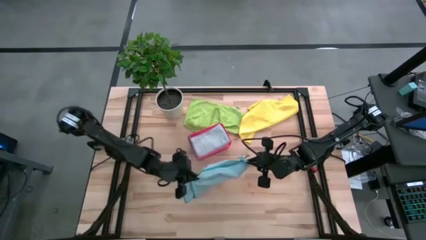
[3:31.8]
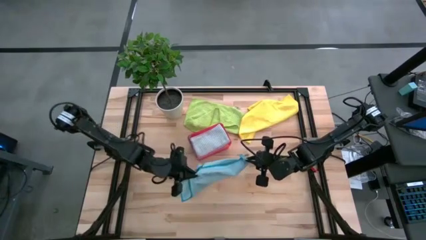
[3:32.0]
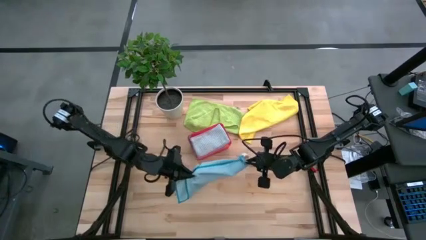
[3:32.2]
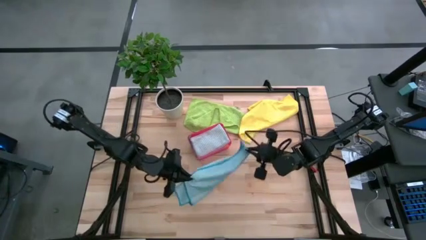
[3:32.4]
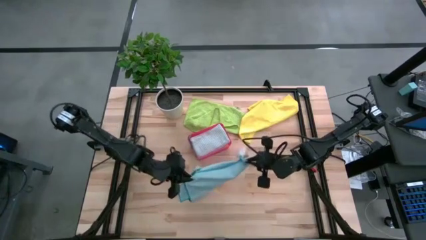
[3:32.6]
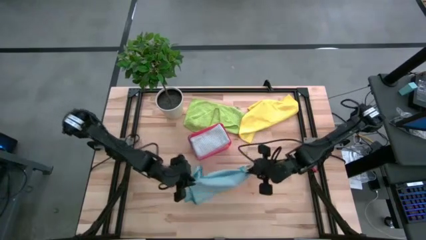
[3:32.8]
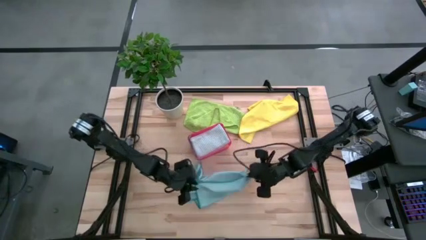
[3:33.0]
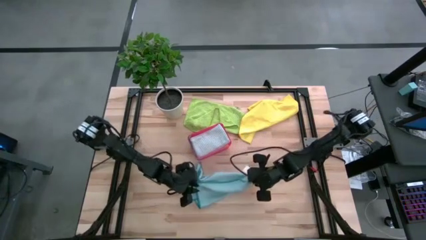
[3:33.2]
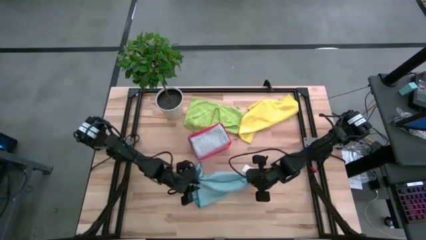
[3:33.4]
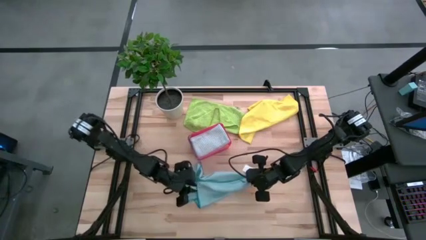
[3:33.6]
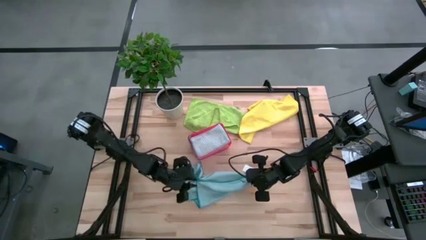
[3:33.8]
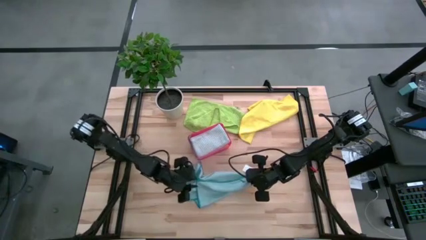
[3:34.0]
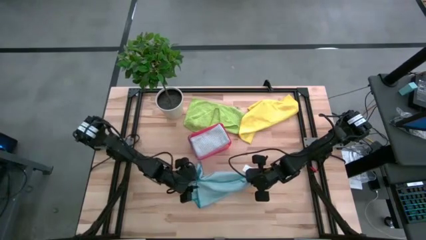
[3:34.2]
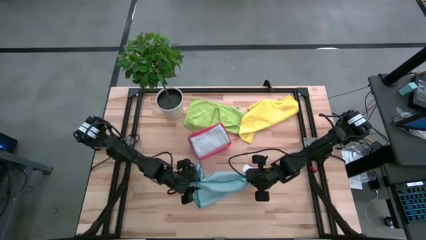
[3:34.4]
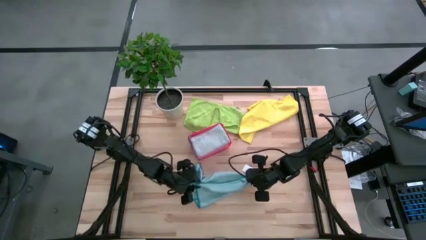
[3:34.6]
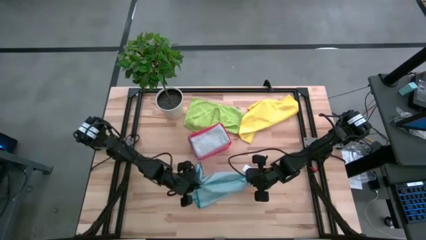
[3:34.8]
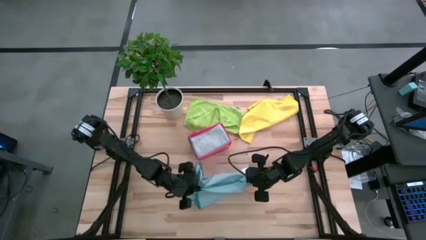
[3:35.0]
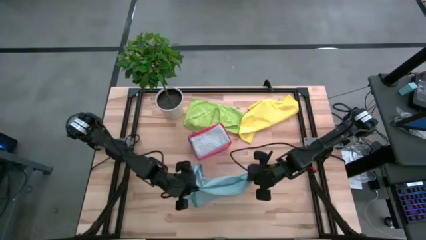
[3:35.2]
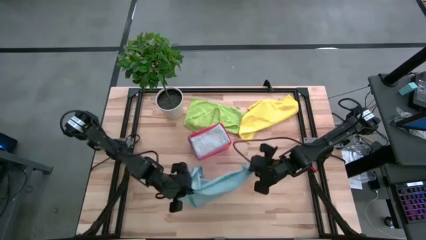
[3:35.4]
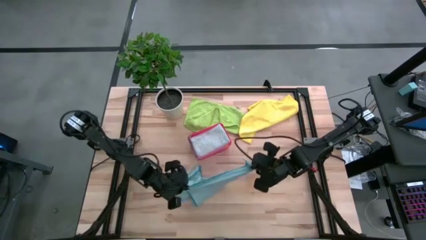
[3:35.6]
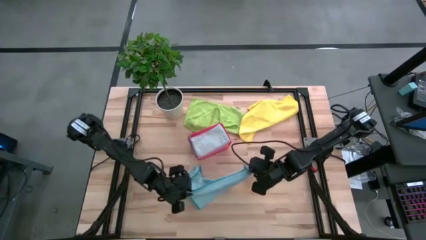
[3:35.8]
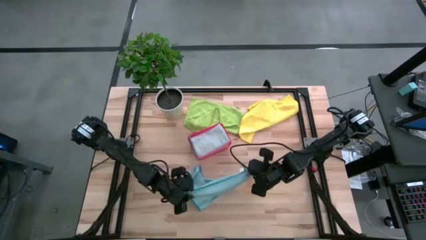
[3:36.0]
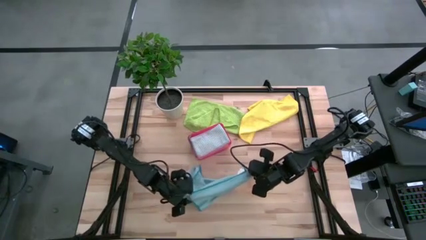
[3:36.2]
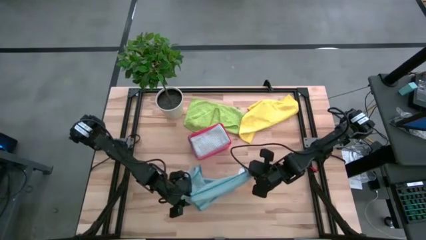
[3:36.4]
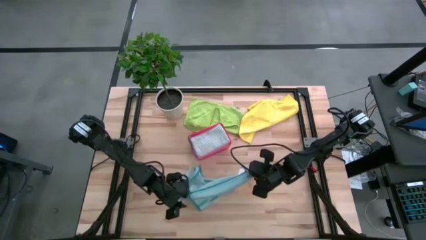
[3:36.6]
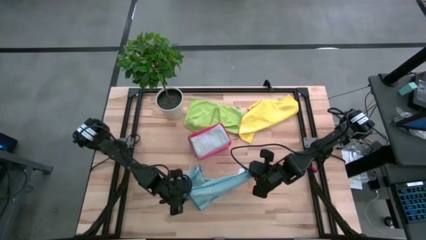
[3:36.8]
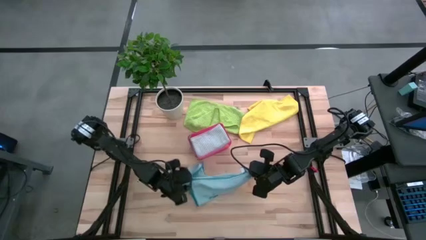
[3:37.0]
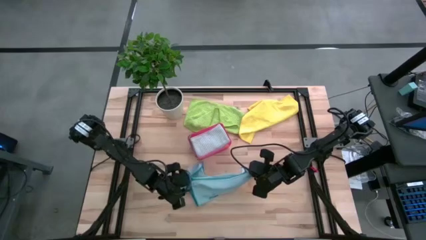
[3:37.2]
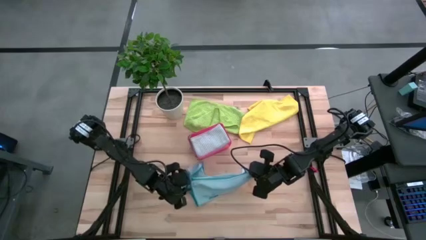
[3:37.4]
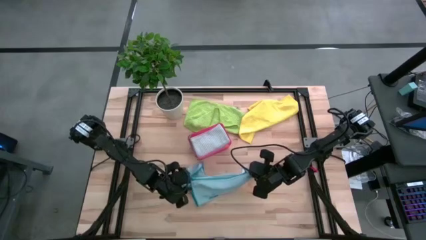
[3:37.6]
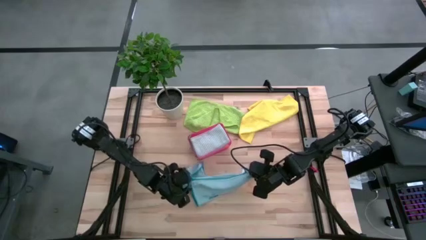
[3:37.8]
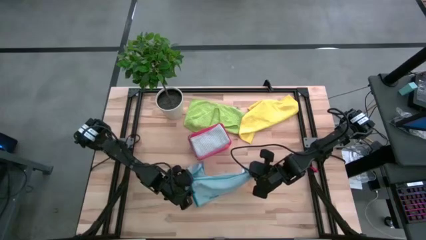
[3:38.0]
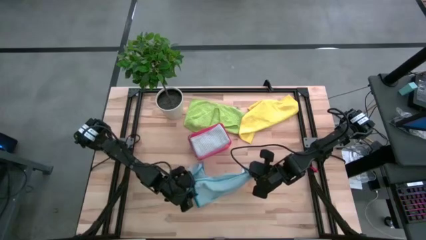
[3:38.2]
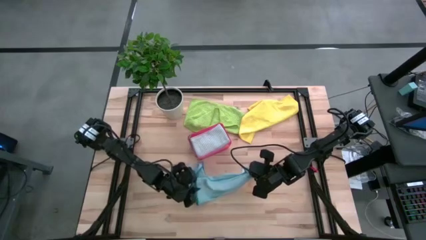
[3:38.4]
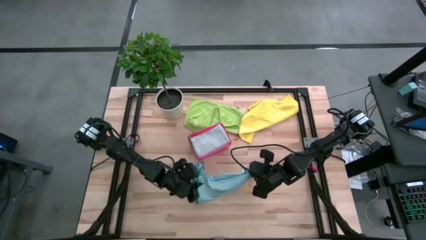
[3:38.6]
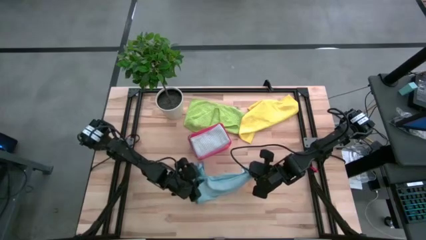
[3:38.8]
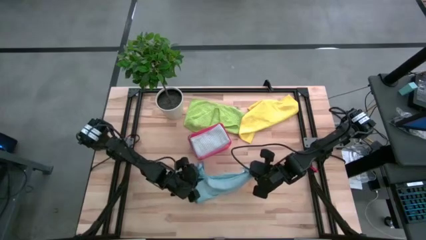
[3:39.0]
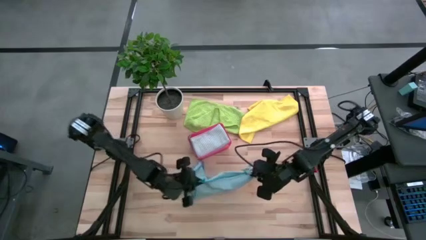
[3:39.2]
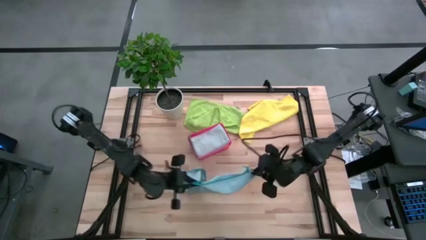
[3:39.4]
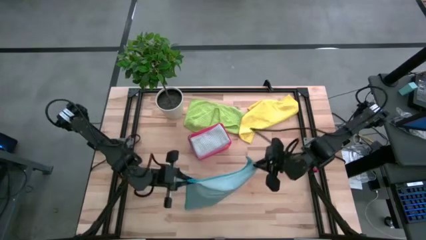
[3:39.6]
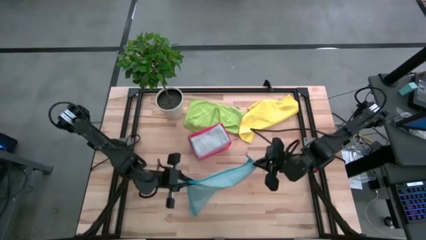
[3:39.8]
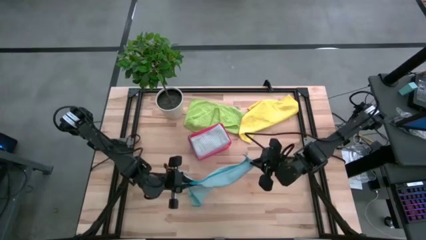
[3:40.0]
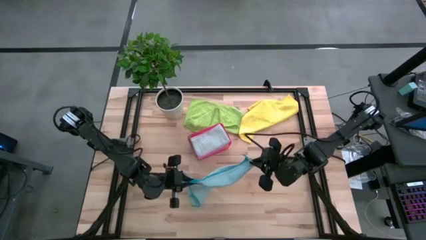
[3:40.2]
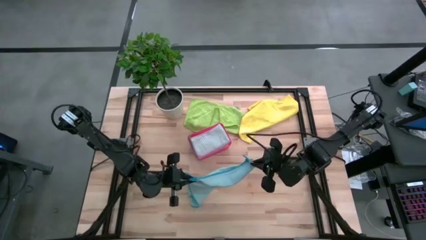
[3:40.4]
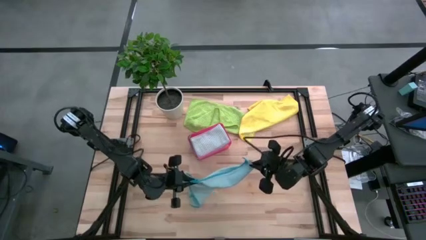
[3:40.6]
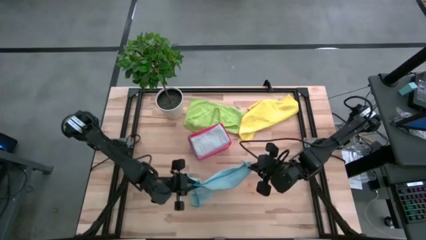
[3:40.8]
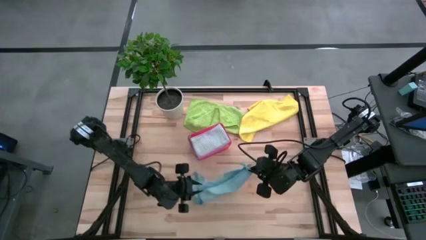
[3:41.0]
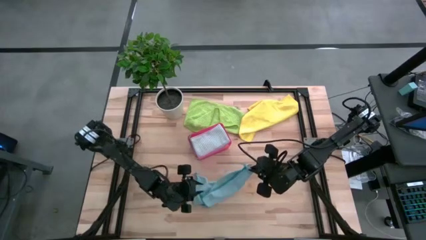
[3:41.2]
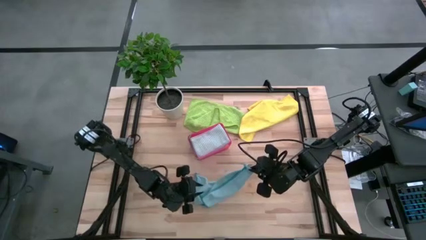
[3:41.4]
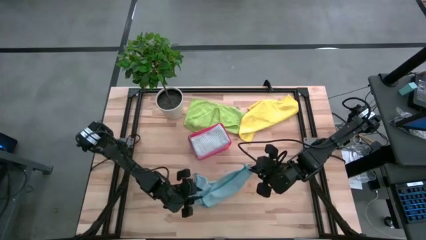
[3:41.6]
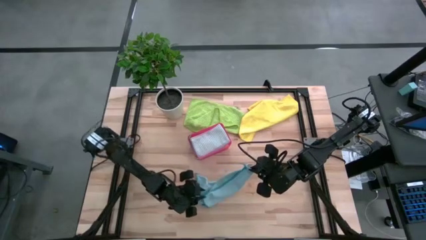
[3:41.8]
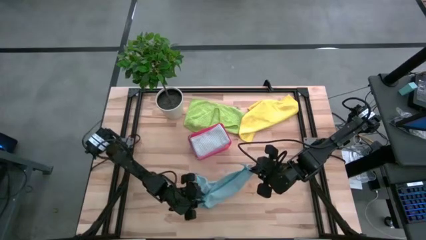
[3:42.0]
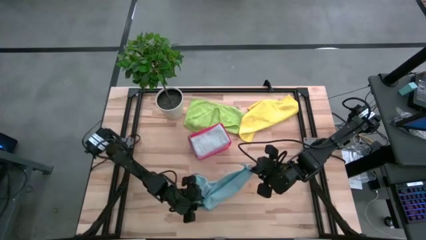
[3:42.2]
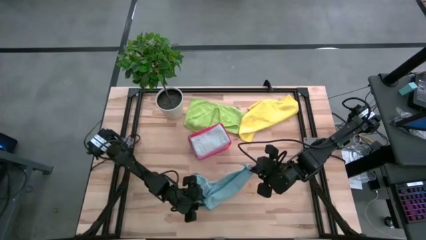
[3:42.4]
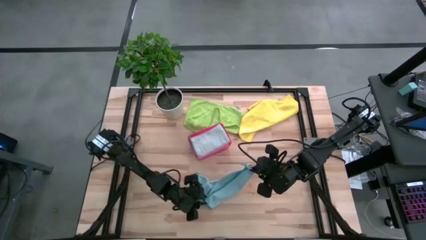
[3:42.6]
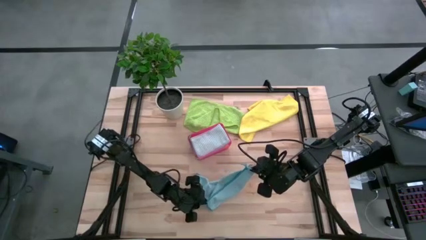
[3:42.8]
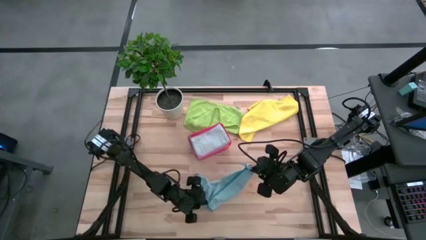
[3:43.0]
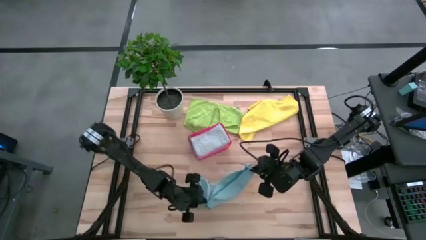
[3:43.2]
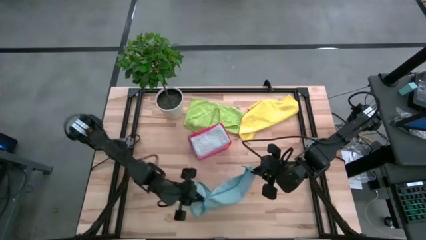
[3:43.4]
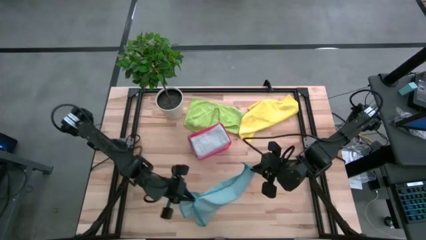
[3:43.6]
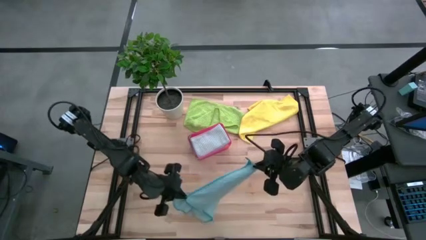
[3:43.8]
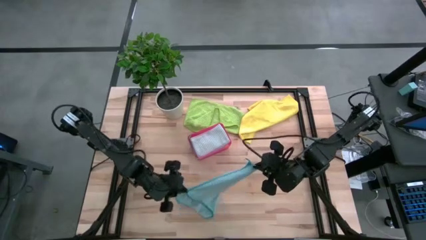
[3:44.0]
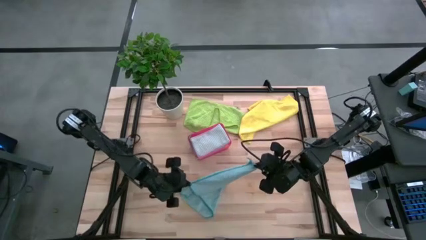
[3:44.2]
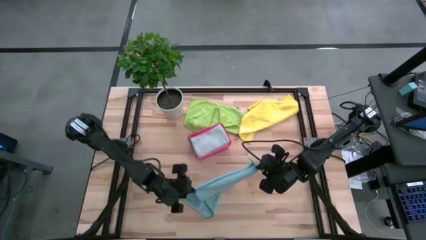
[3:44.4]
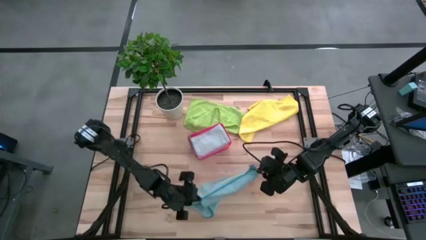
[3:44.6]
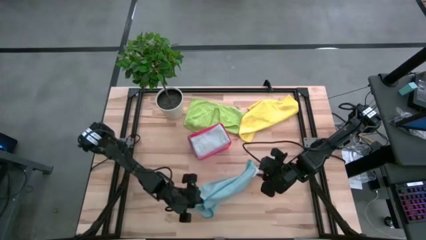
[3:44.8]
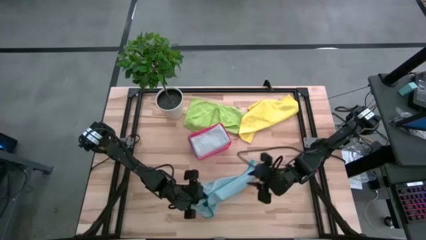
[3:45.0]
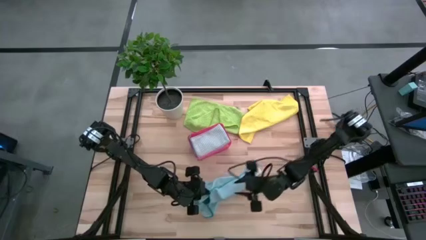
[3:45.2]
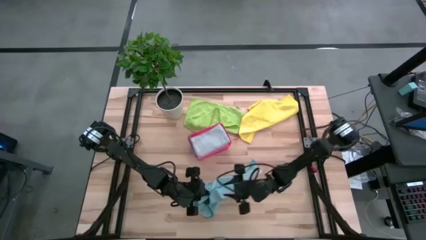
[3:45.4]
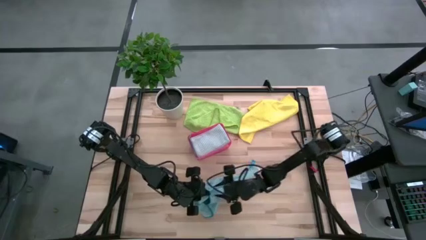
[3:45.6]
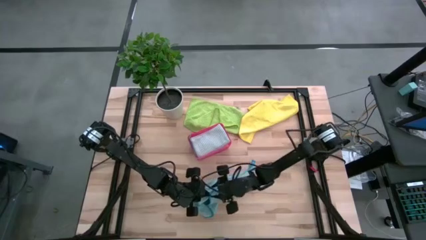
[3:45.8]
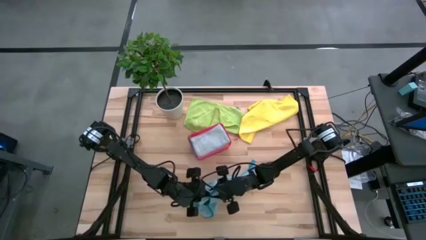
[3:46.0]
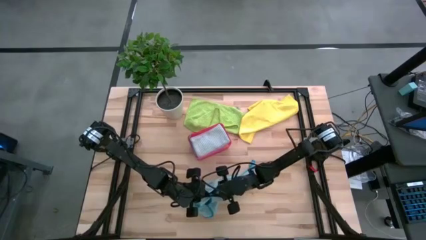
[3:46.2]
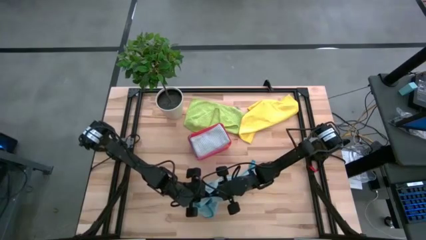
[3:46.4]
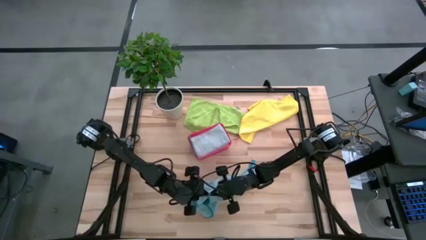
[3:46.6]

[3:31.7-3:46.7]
Task: Fold microfiber towels
Fold the blue microfiber cloth

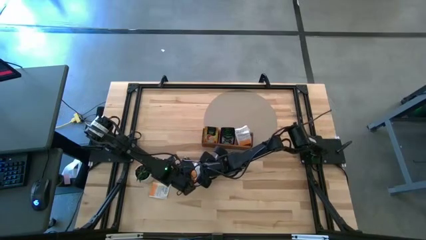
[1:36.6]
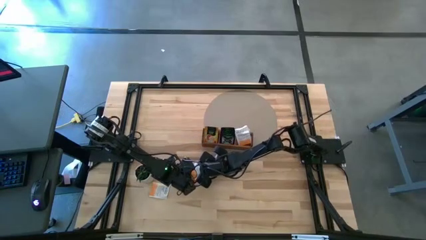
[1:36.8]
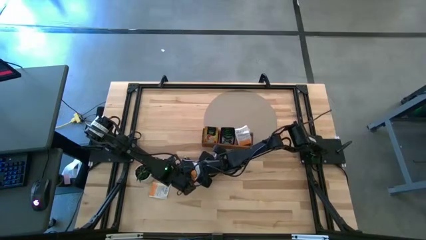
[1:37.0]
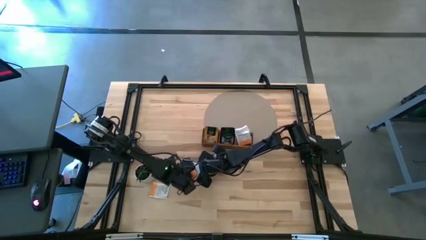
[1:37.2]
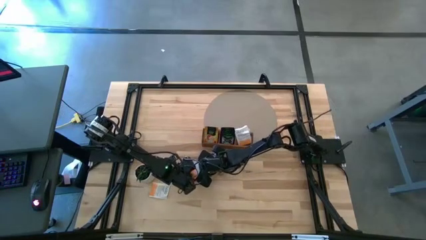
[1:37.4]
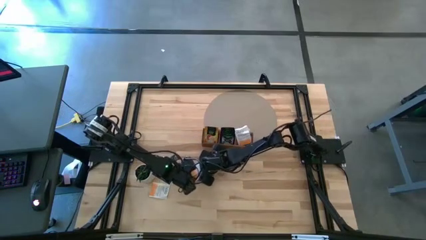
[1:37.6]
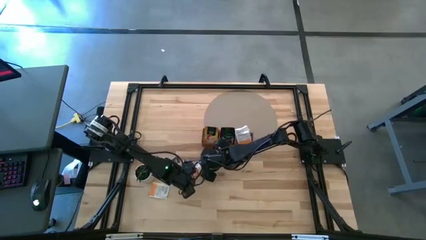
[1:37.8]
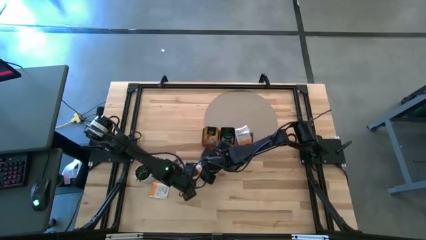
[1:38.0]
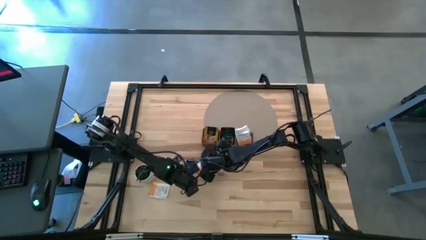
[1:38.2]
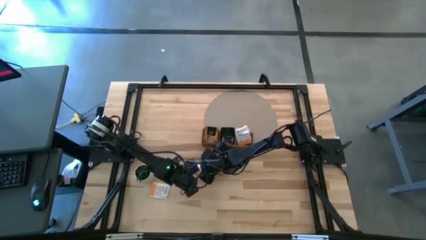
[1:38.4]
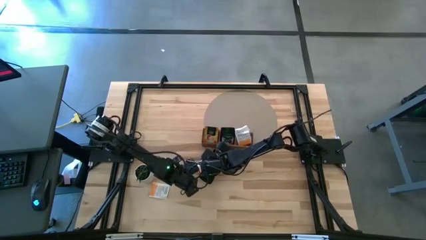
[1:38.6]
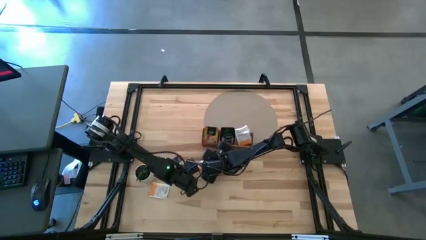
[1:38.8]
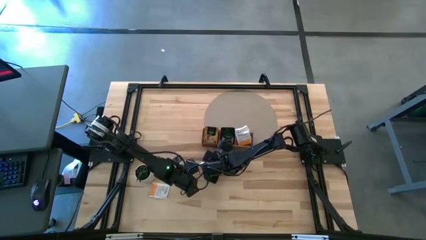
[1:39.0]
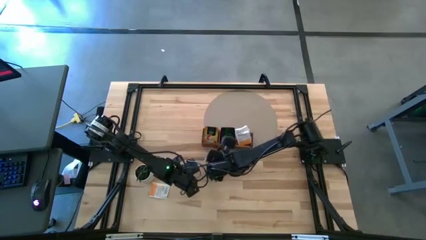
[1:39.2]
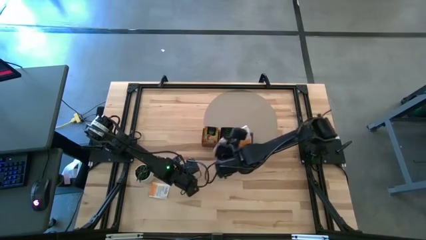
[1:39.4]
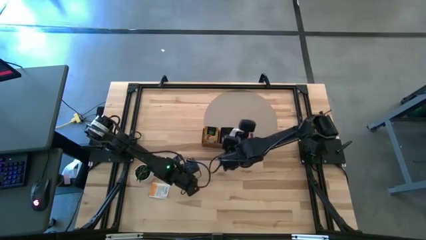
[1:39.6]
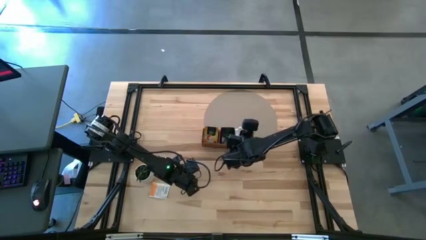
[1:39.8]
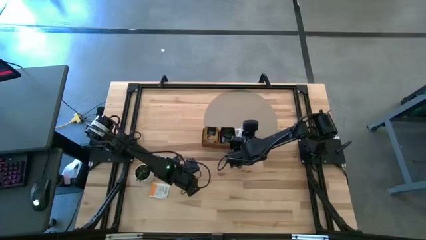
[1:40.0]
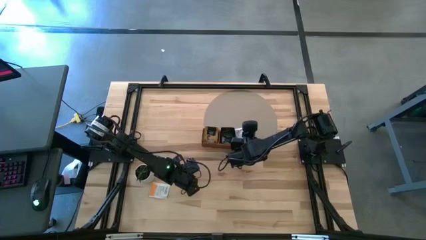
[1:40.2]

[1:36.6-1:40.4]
Task: Pick & Place Tea
Put the white tea bag into the right section of the wooden organizer
